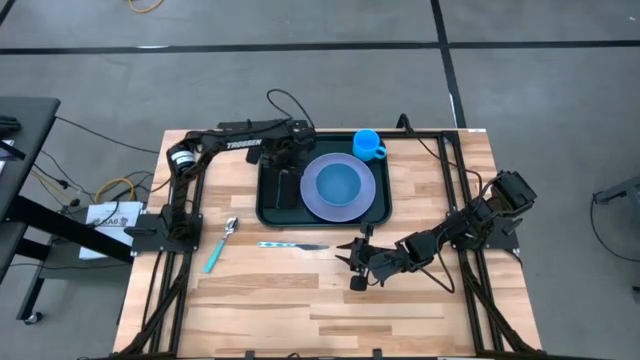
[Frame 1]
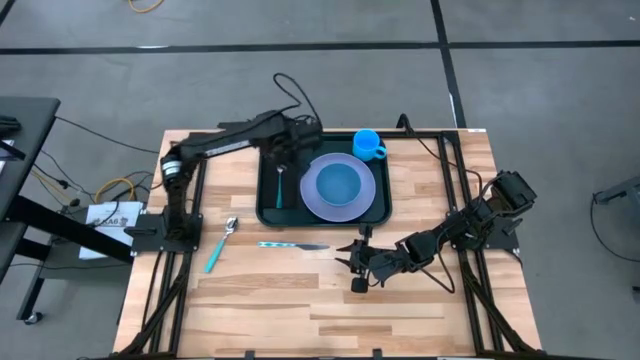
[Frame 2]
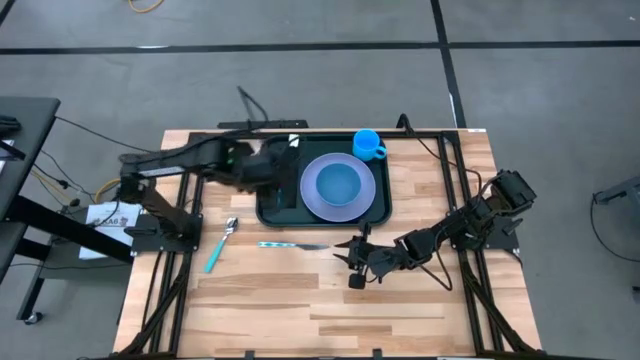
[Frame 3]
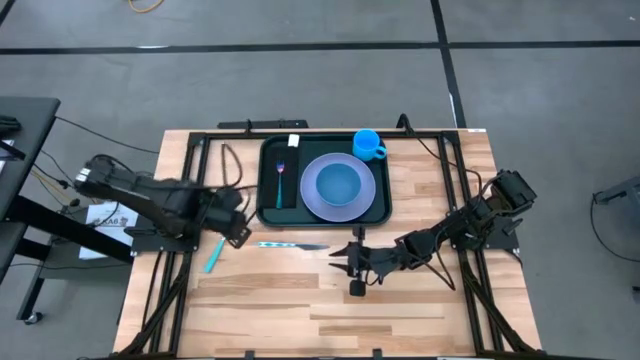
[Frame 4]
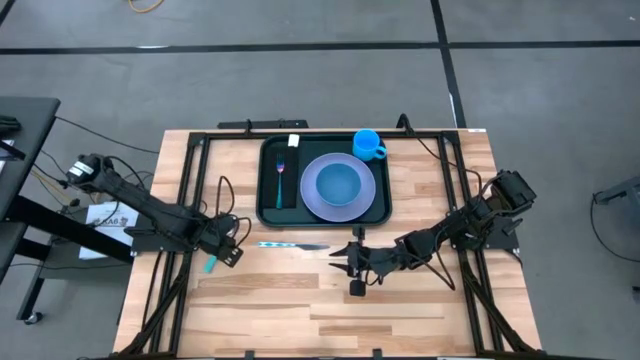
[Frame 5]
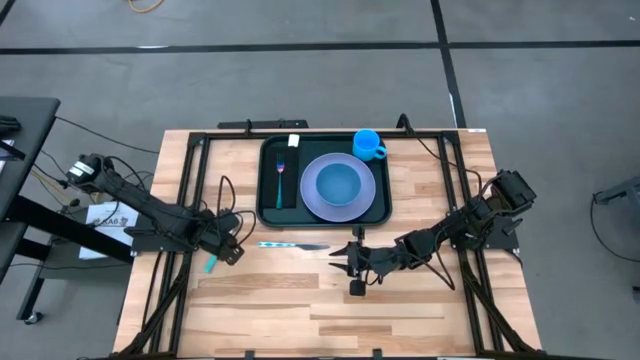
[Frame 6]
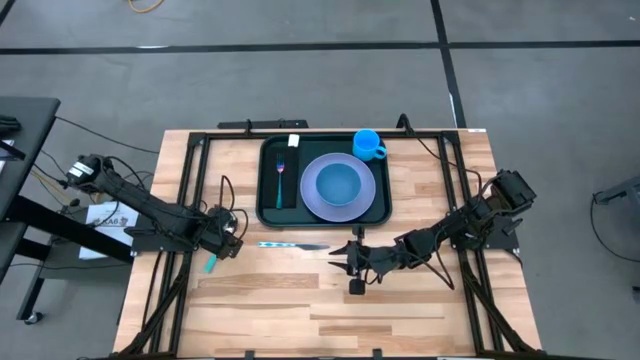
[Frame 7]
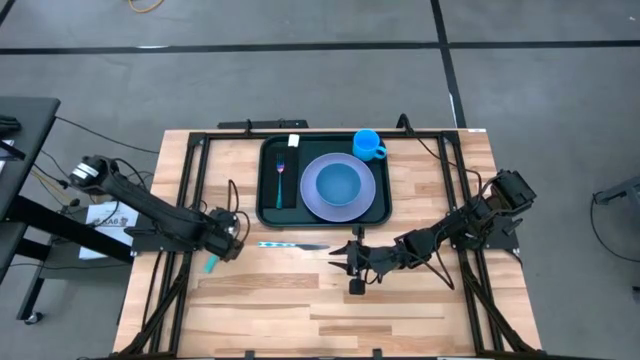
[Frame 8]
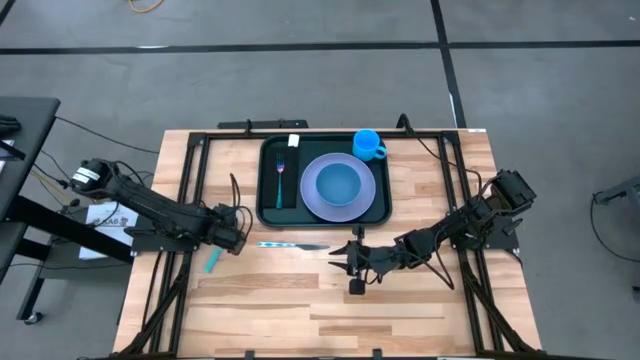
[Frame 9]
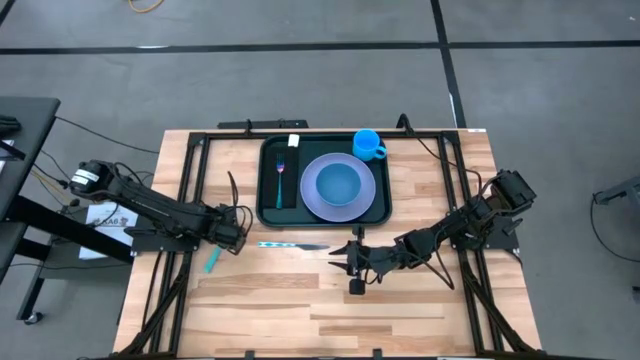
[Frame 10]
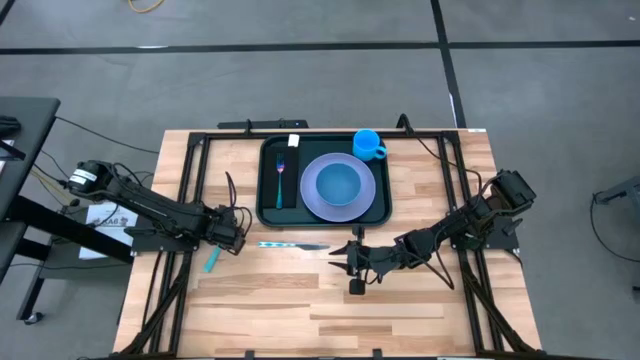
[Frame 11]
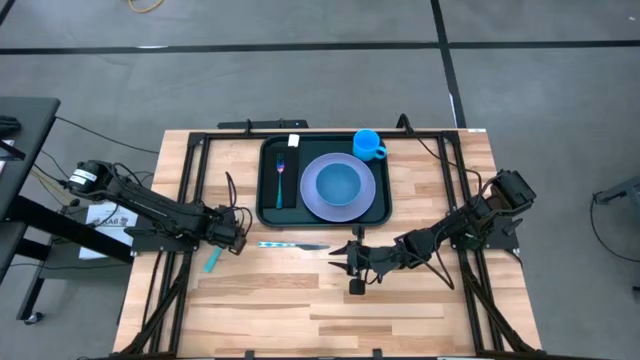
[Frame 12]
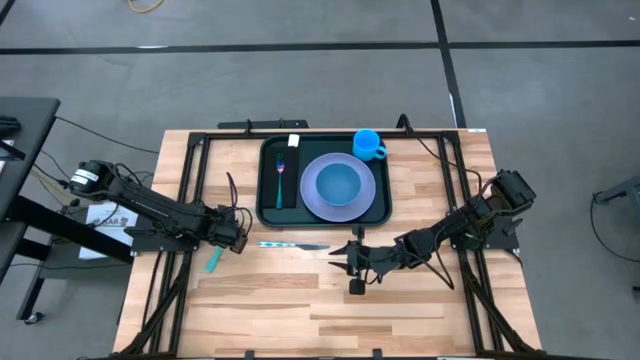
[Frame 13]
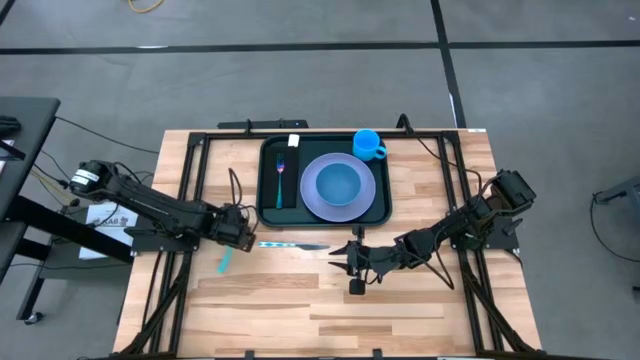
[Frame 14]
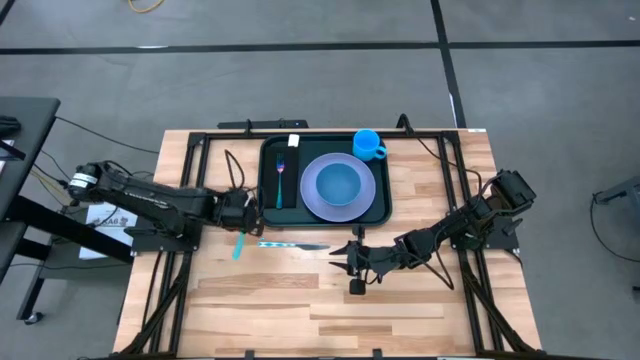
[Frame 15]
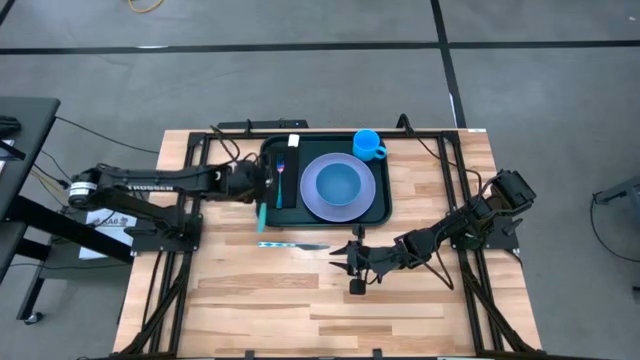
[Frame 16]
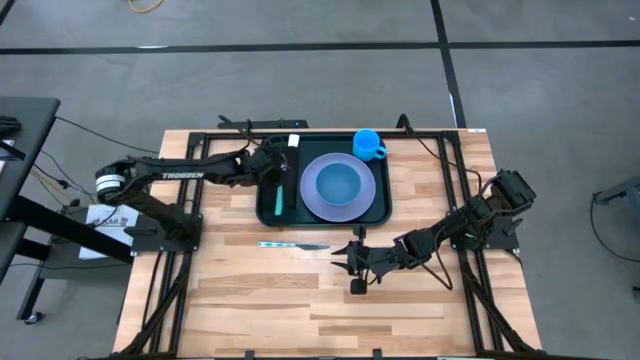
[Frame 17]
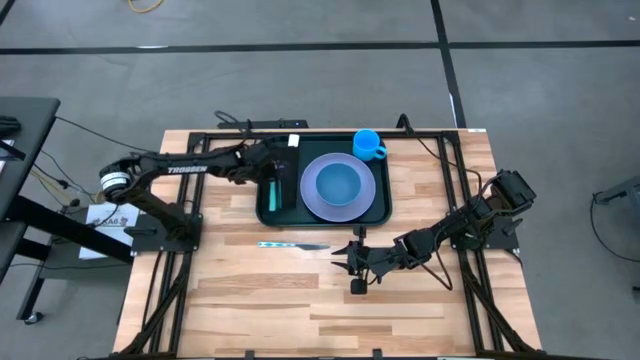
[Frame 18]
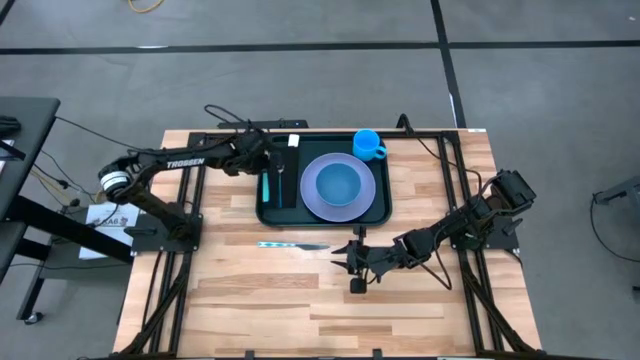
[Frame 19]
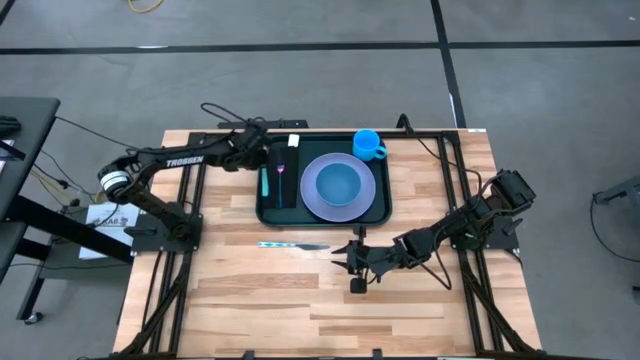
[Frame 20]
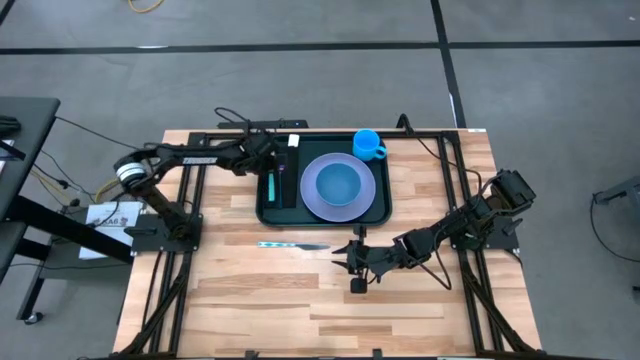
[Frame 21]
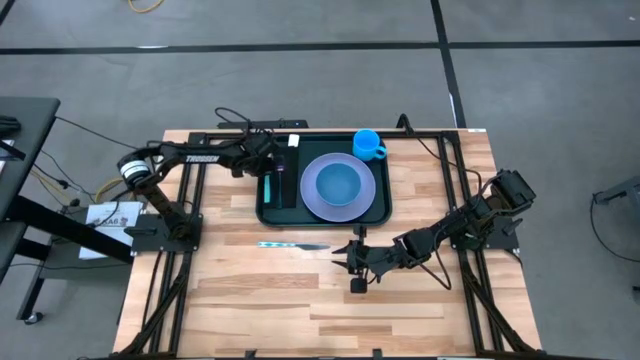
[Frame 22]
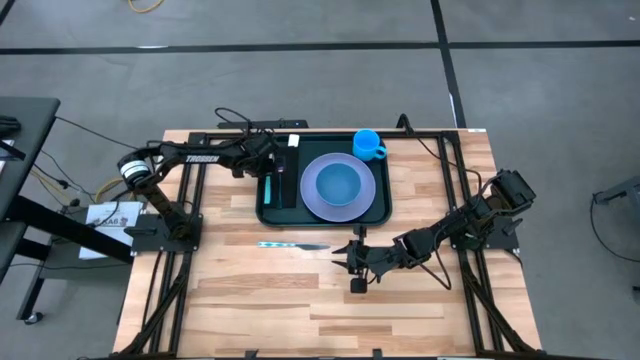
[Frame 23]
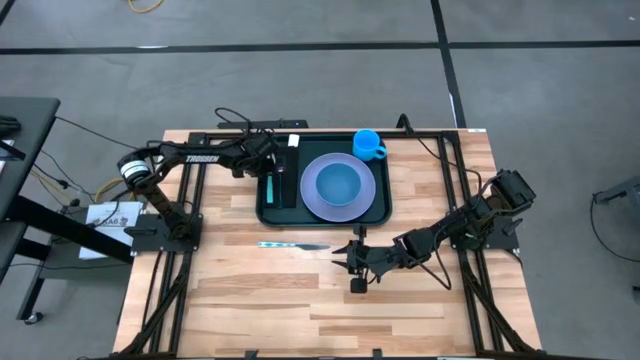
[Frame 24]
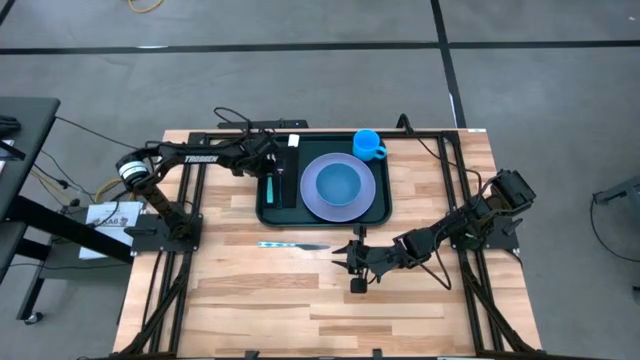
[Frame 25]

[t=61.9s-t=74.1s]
Task: Set up tray
Put the green spoon on the black napkin to the left of the blue fork

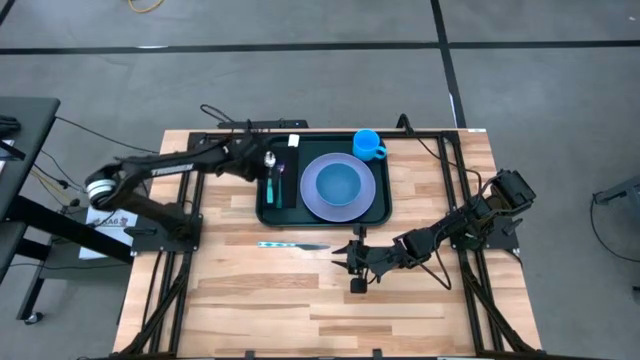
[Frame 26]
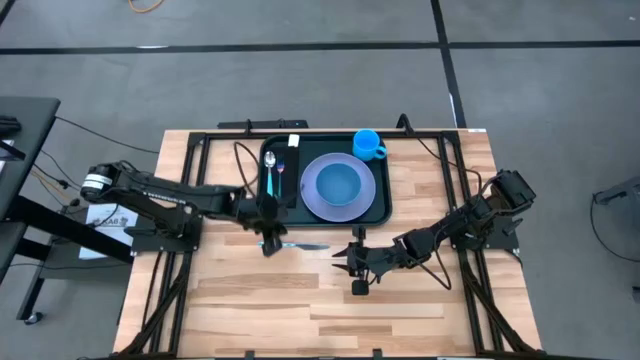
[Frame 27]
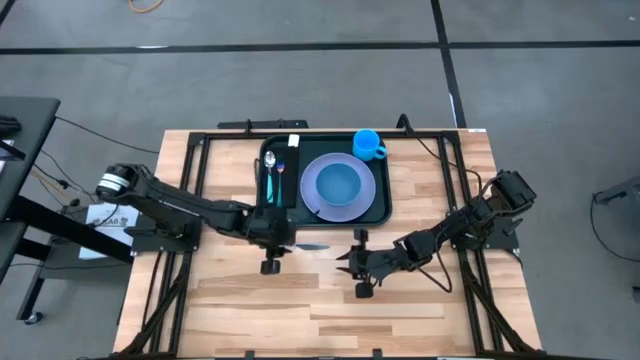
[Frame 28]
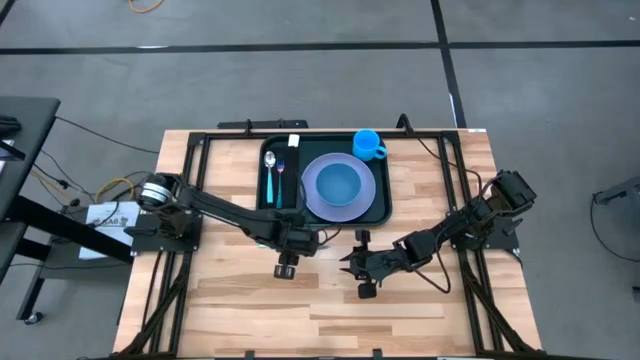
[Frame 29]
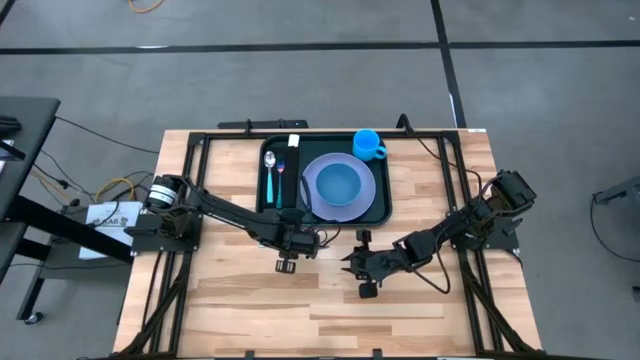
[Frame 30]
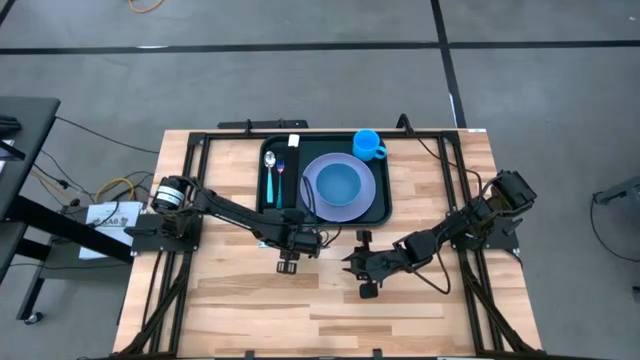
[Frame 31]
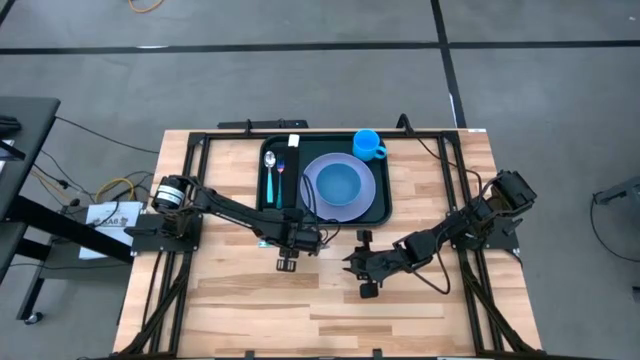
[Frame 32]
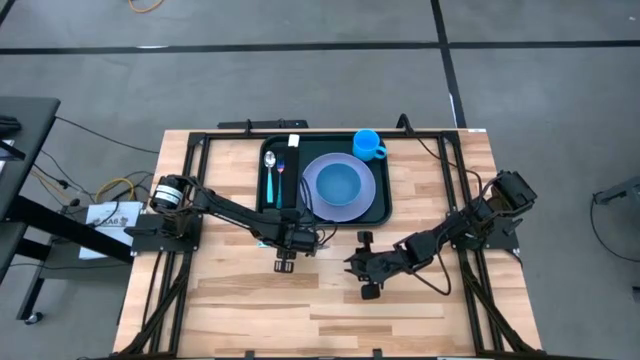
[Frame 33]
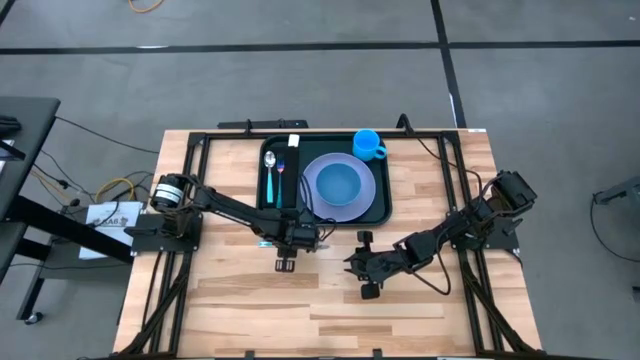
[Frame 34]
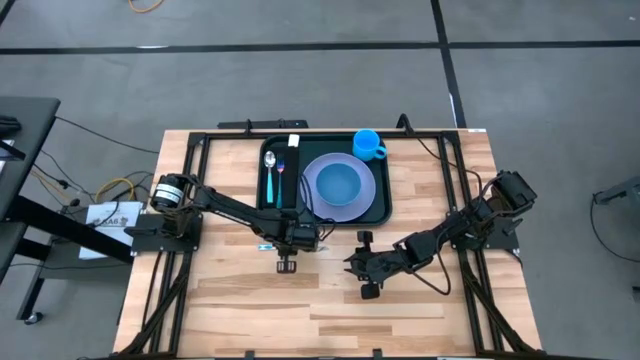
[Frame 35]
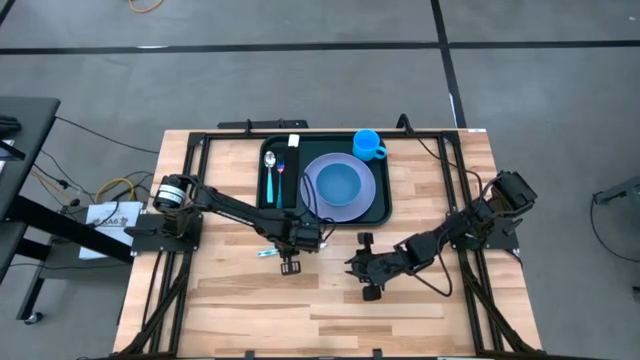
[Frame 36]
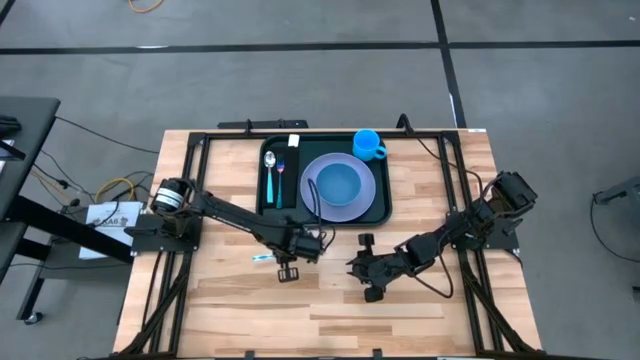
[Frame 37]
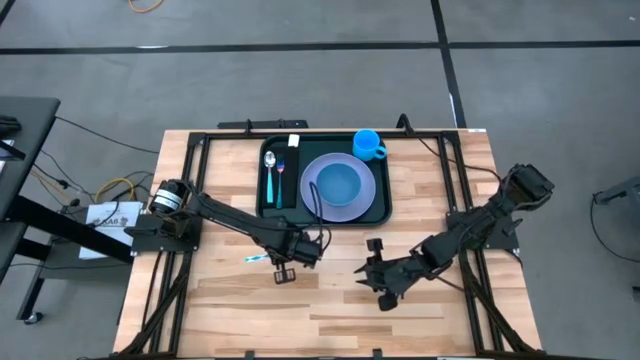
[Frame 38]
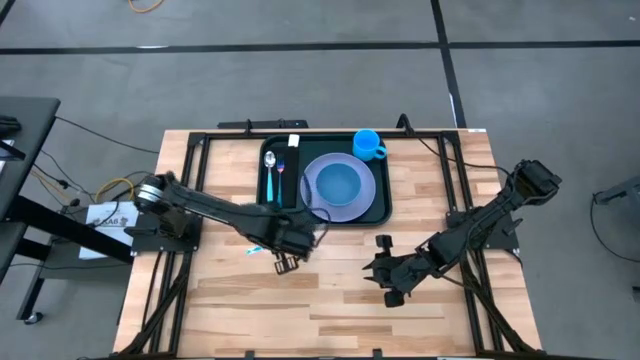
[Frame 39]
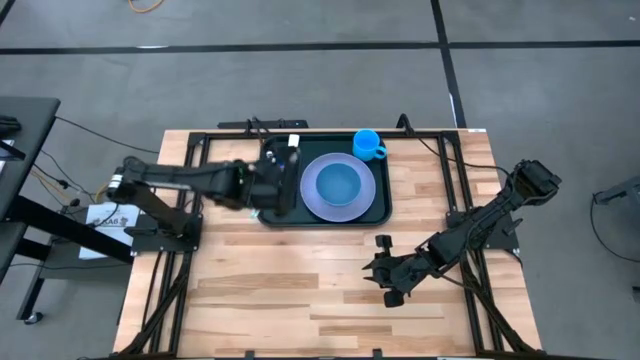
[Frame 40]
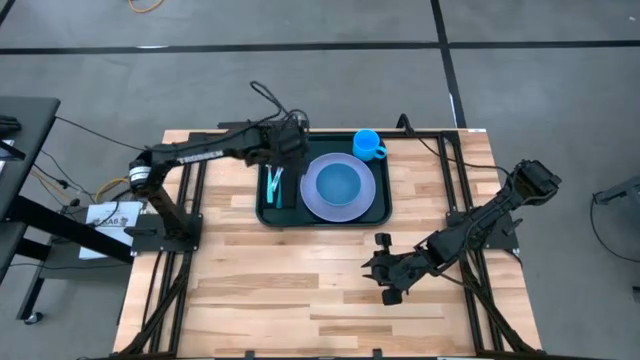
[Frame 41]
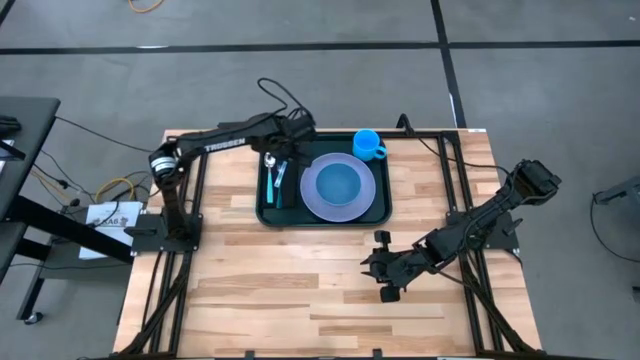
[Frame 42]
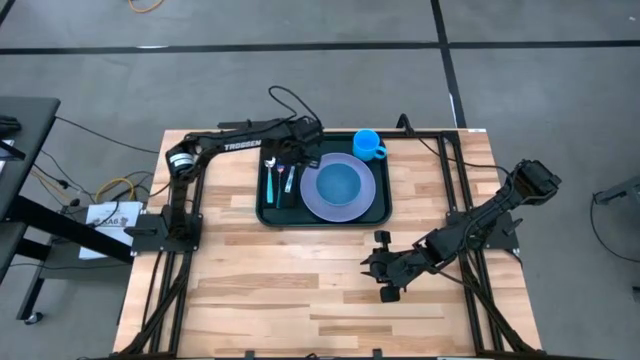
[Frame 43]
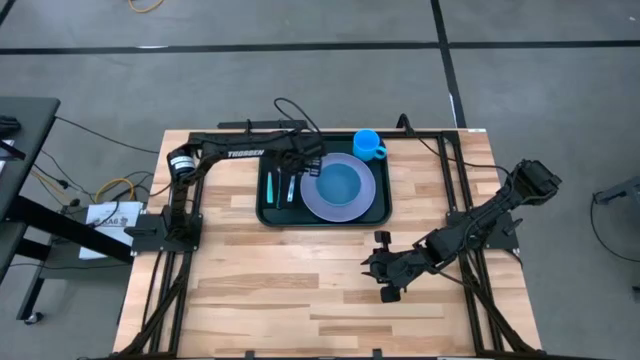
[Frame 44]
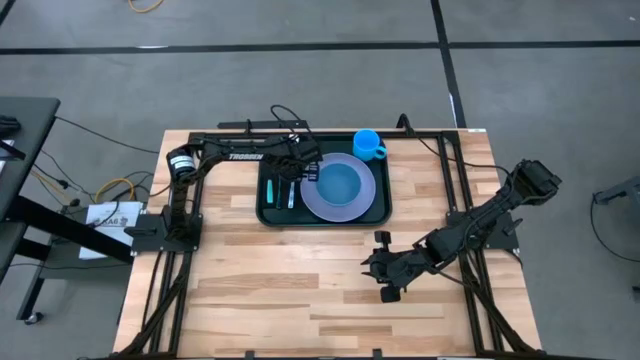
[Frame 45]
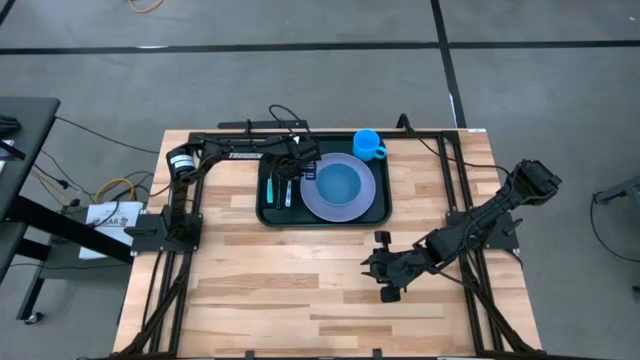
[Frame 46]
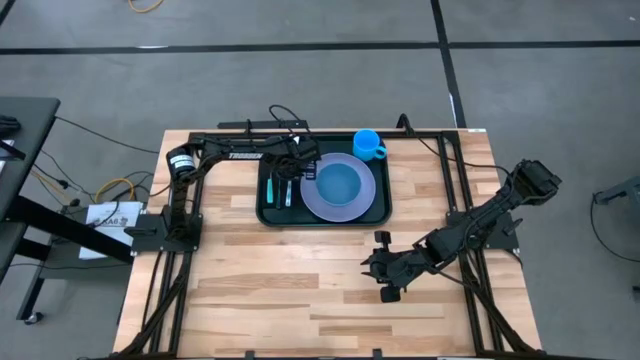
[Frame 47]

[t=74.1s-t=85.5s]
Put the blue patterned knife on the black napkin to the right of the blue fork
